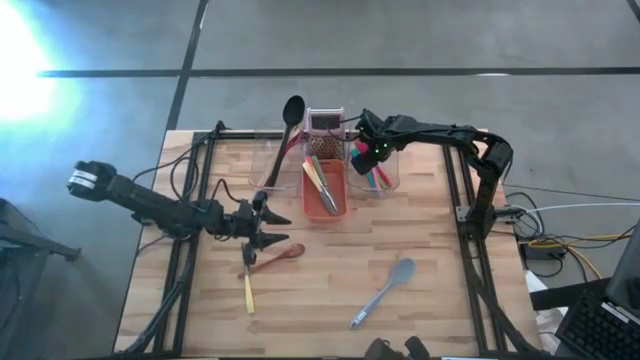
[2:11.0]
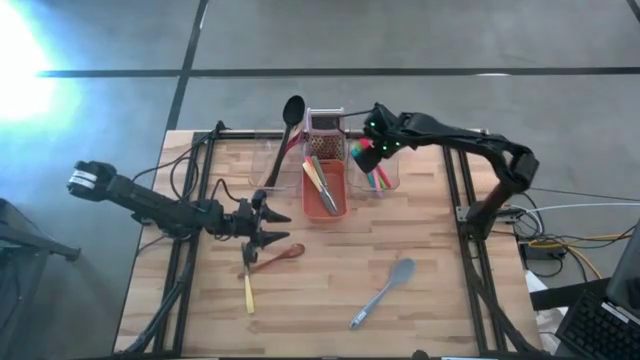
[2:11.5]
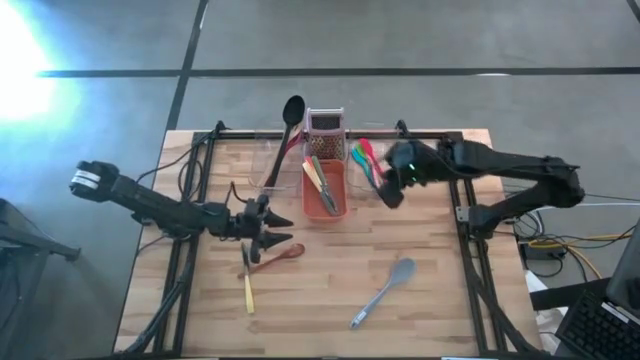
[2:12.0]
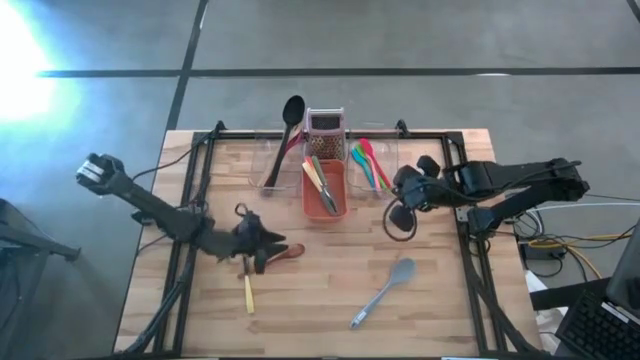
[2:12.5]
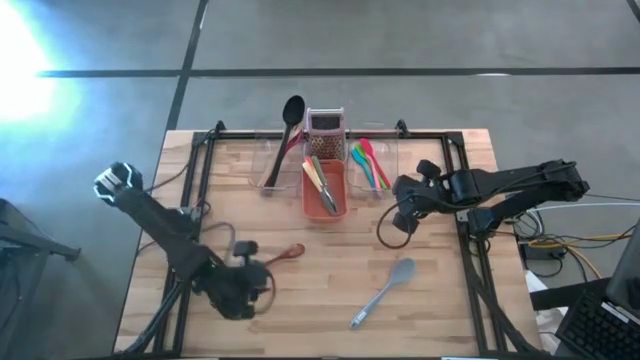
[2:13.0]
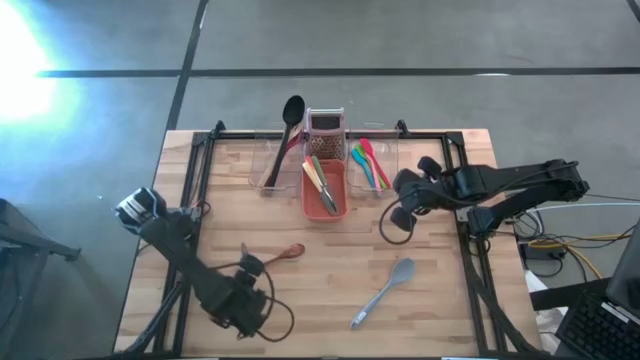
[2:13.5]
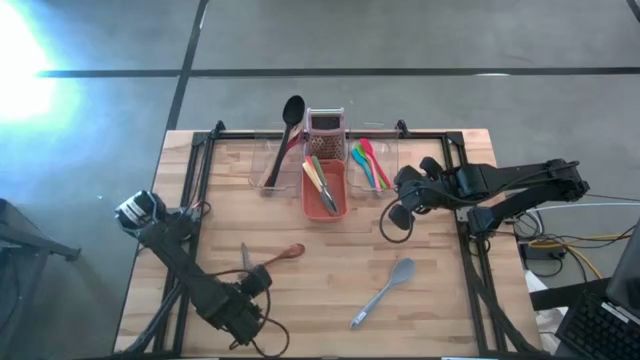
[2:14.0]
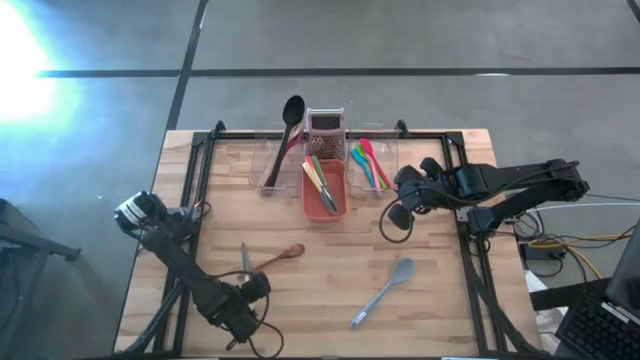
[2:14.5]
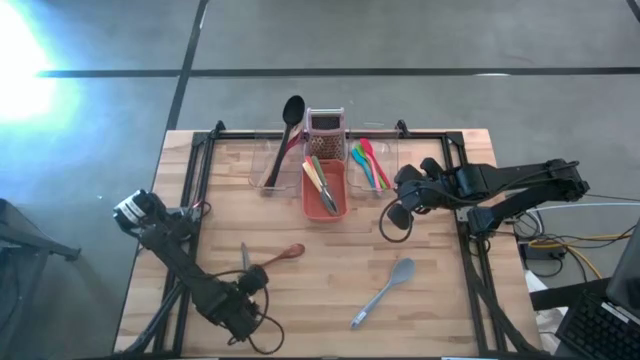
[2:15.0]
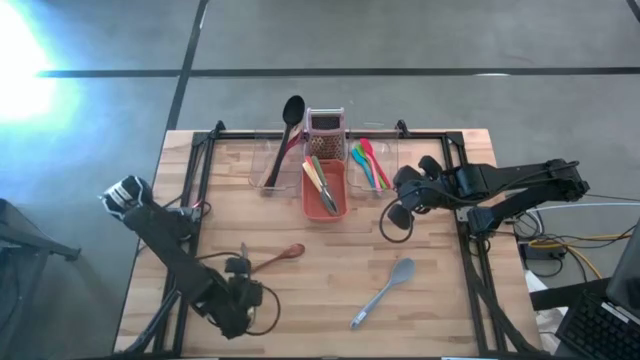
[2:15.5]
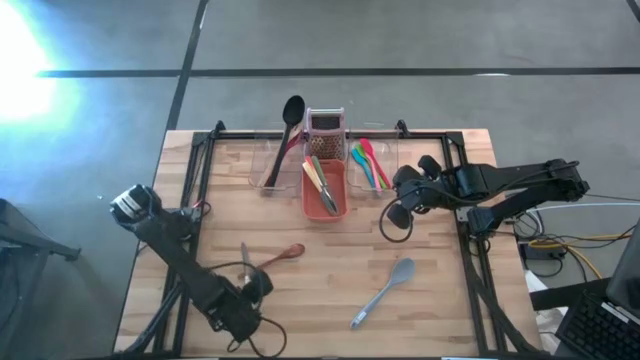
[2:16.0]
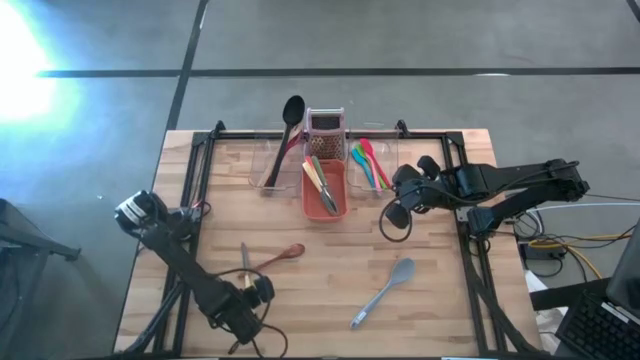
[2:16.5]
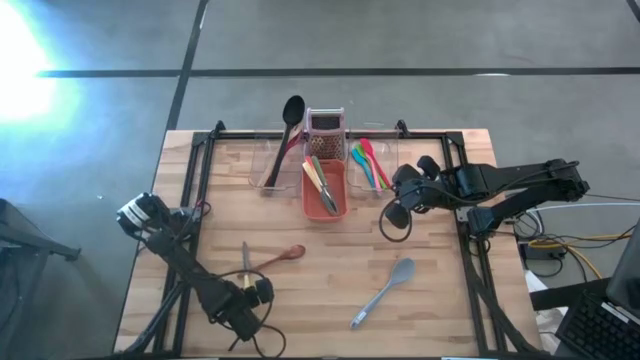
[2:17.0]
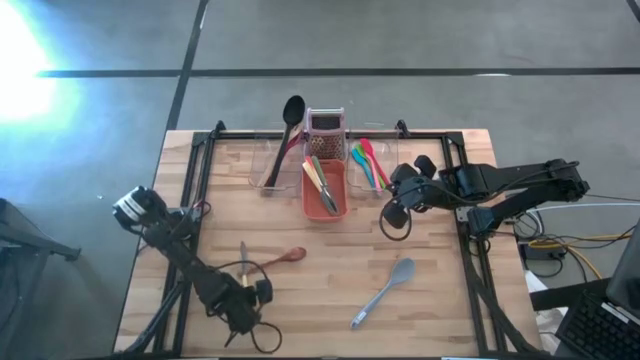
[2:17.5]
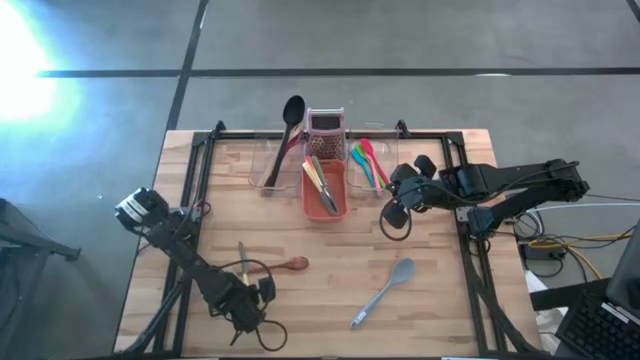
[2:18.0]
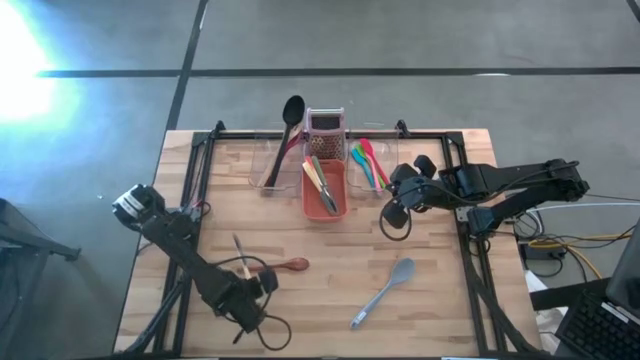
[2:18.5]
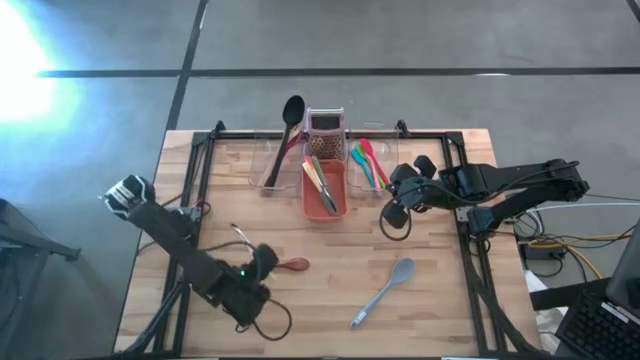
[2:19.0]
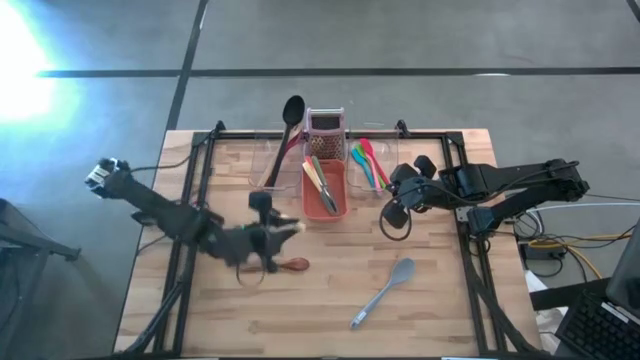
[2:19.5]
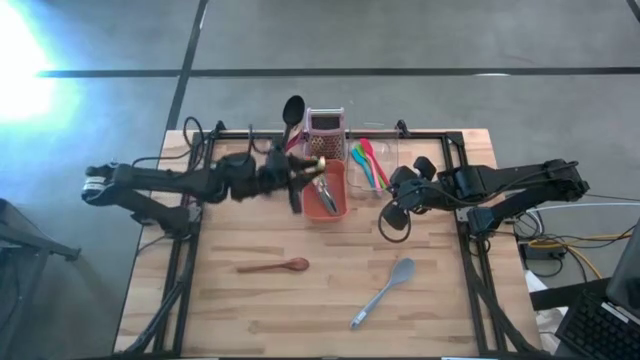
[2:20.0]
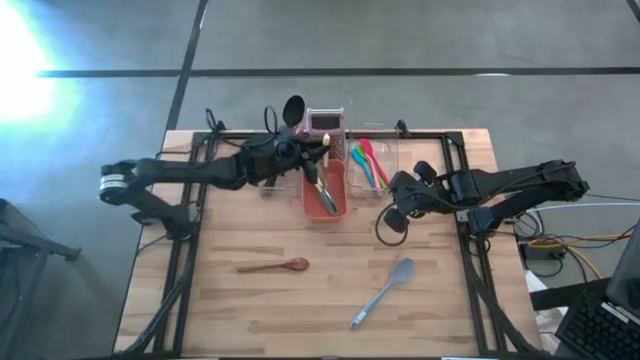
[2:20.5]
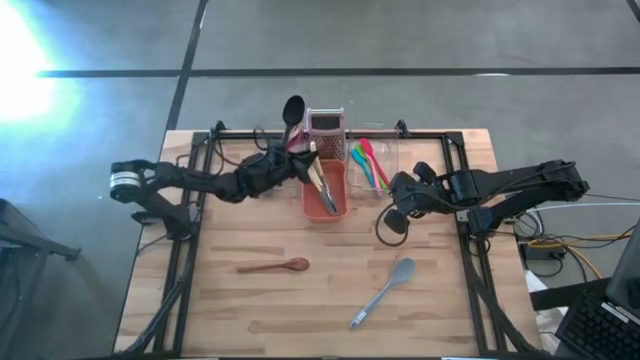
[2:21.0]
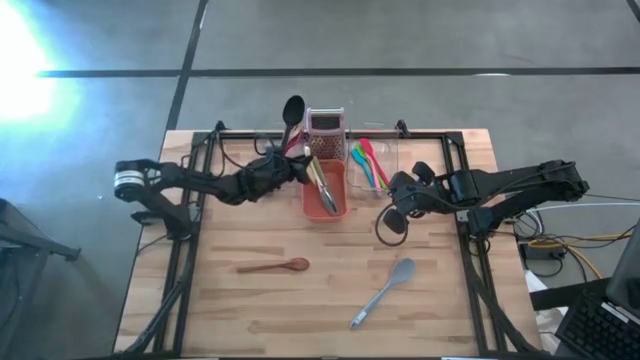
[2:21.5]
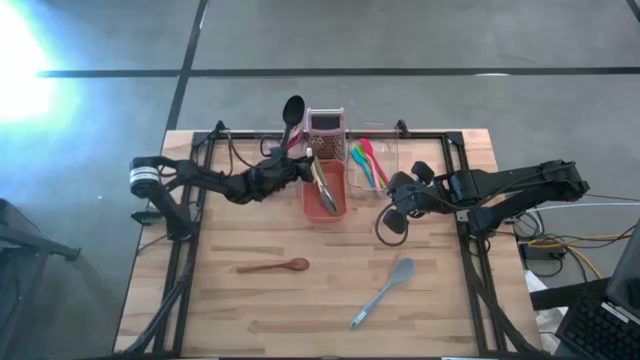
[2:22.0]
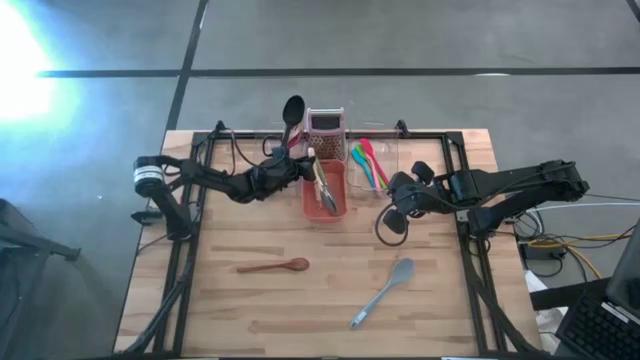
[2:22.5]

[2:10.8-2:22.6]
Task: Pick & Place Kitchen Items
Put the yellow table knife into the orange bin

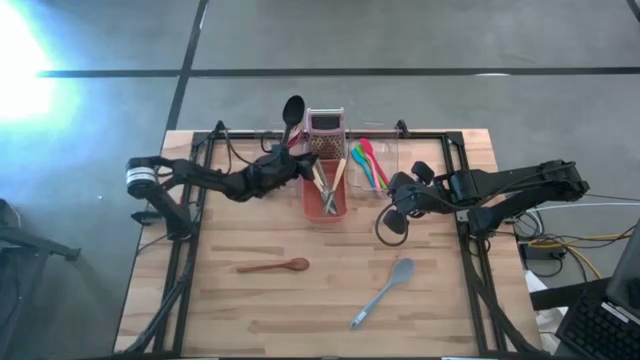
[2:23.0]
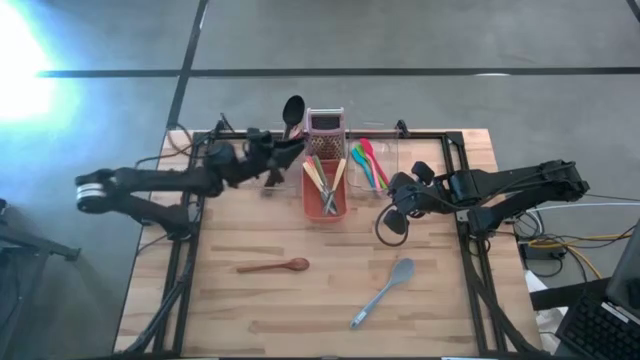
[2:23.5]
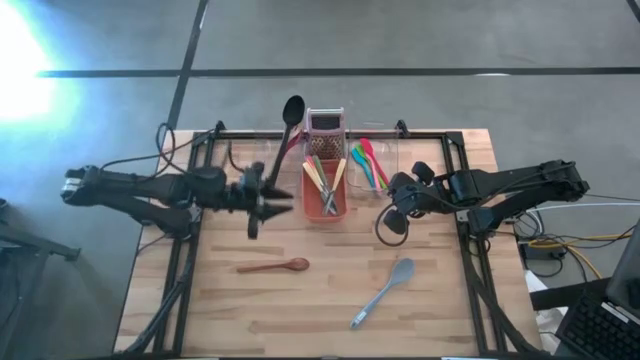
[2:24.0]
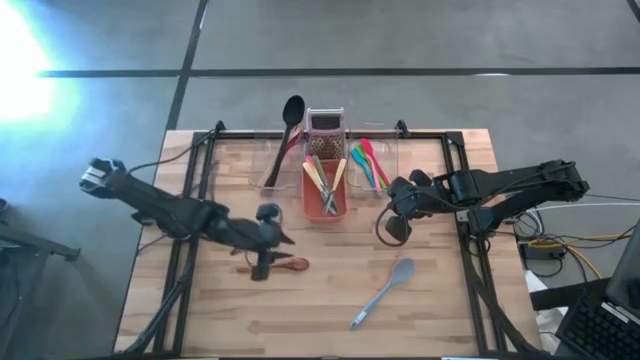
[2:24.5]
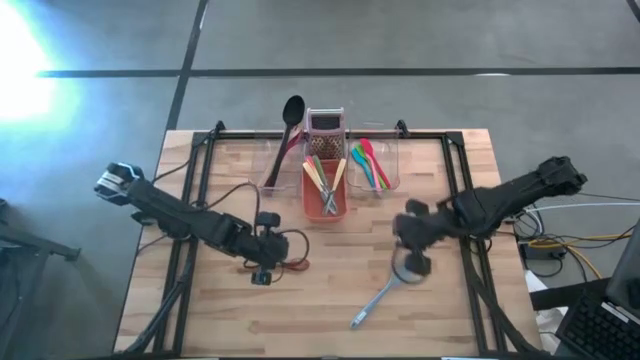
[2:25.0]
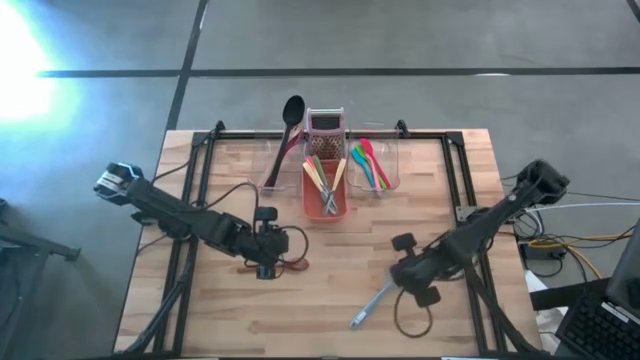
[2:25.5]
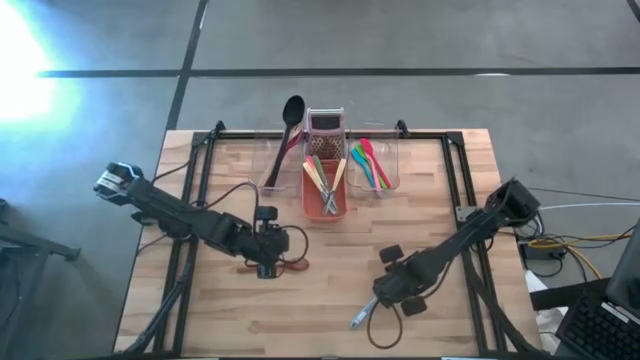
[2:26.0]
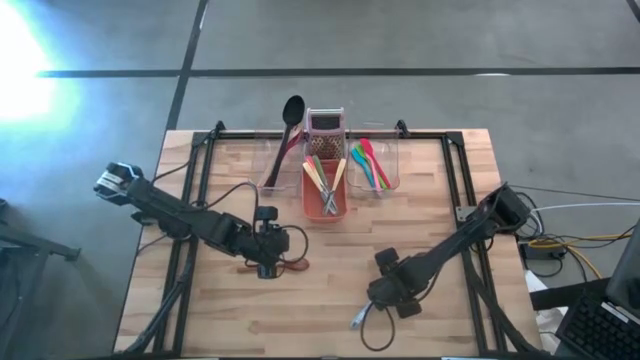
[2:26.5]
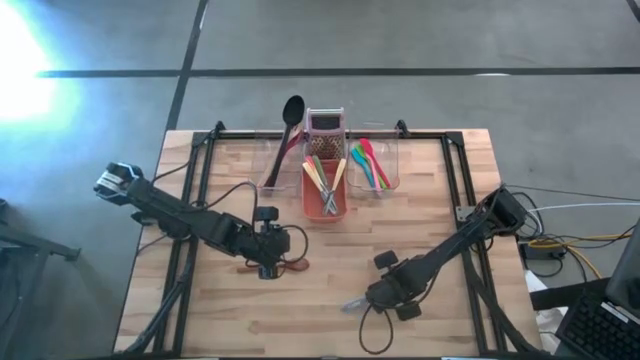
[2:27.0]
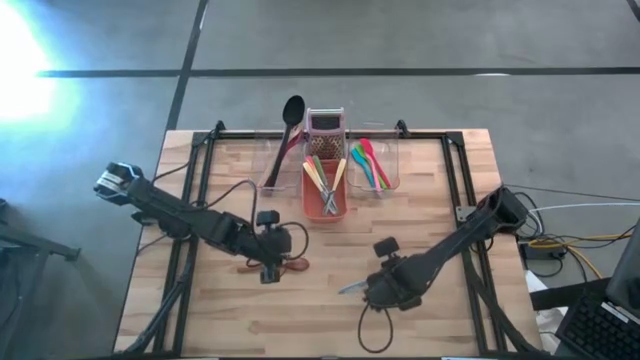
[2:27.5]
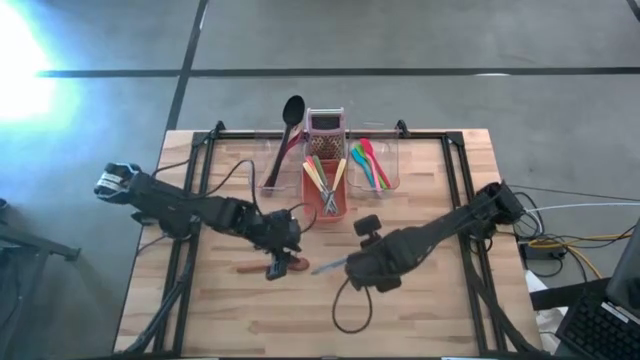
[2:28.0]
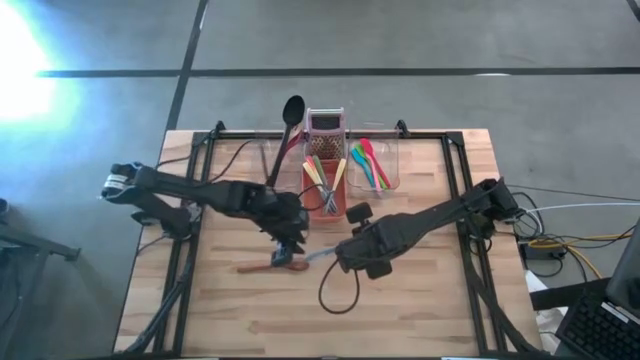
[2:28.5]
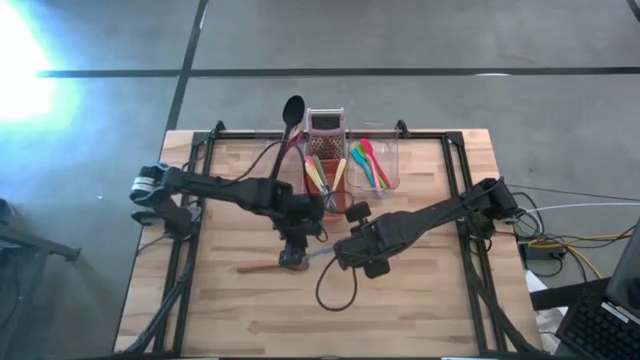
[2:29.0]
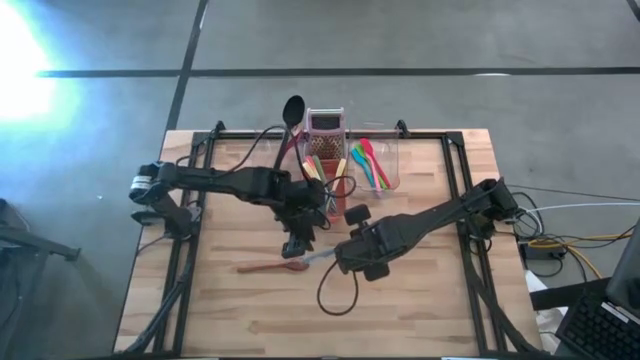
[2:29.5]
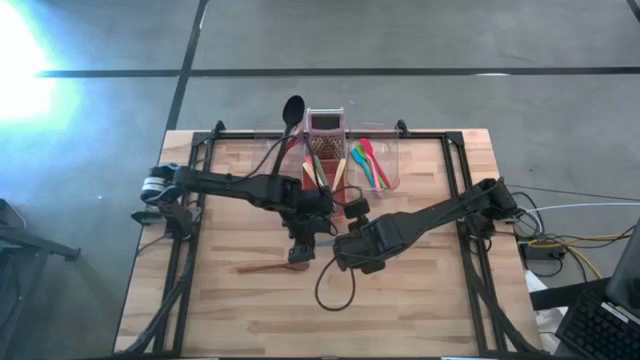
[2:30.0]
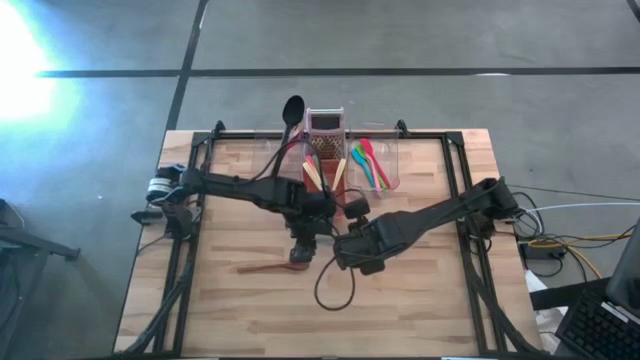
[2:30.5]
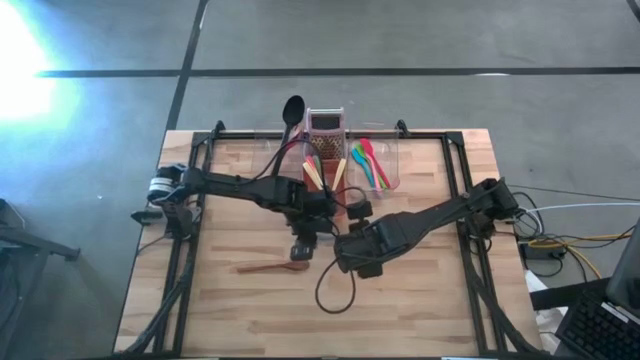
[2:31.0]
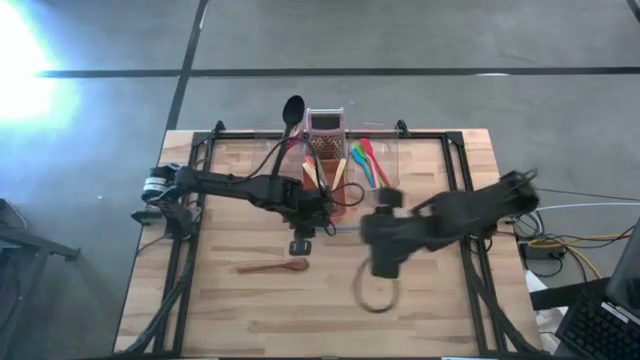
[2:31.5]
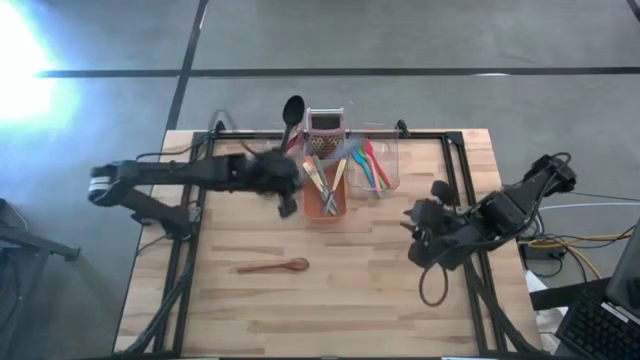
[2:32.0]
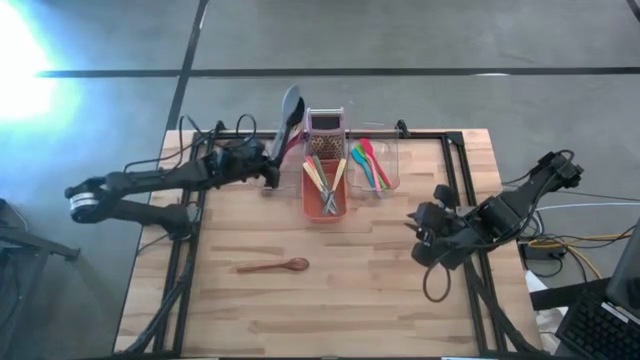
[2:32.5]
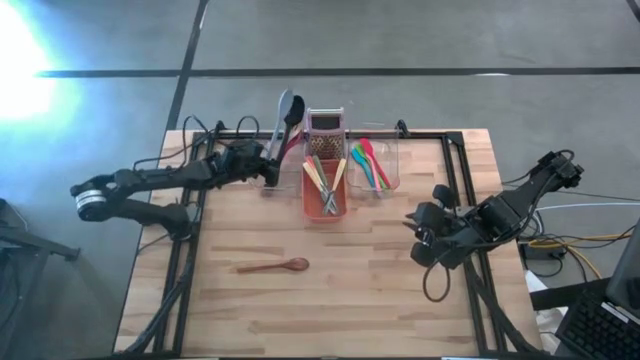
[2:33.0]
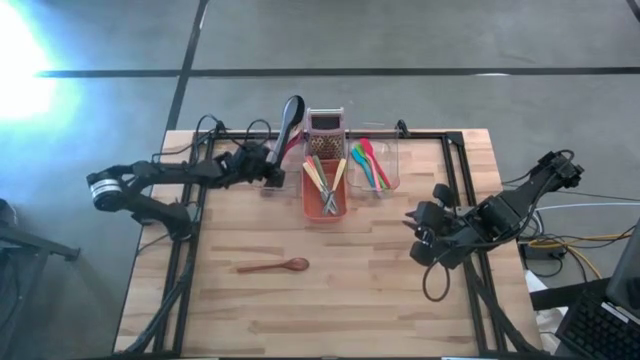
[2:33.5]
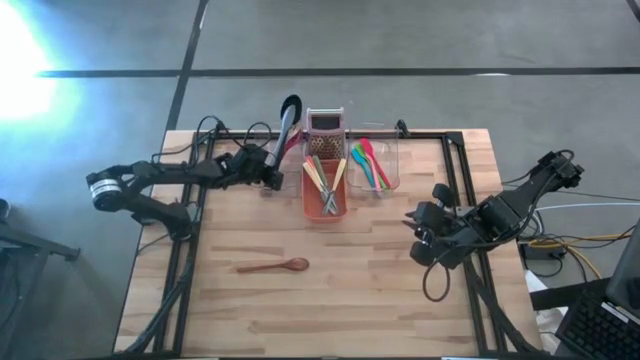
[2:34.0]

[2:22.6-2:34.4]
Put the gray serving spoon into the left transparent bin
